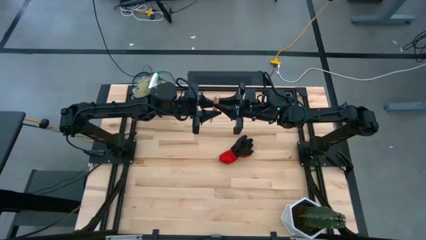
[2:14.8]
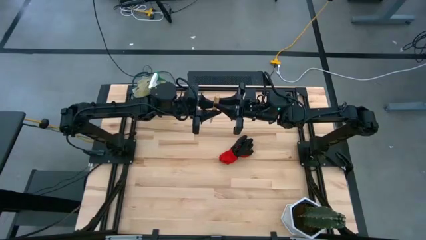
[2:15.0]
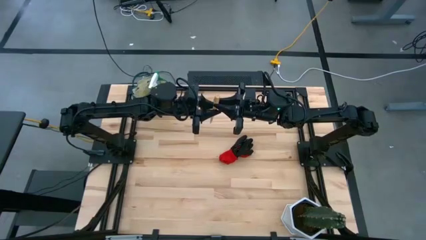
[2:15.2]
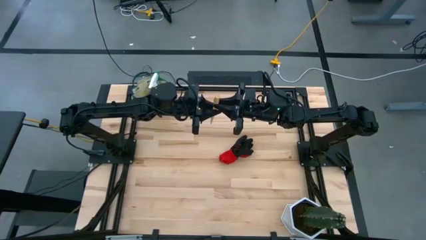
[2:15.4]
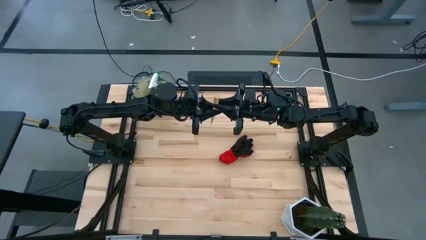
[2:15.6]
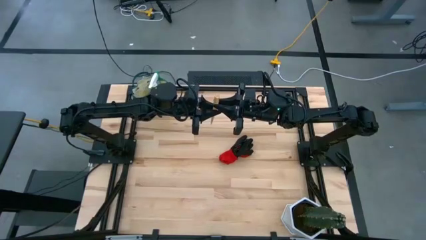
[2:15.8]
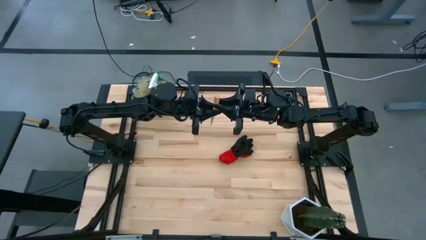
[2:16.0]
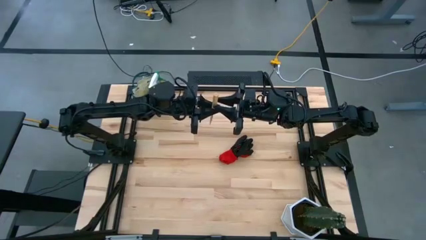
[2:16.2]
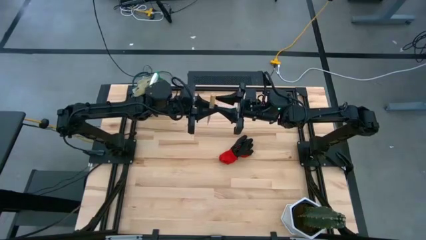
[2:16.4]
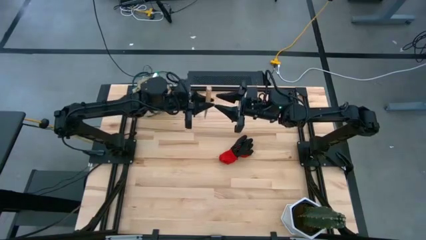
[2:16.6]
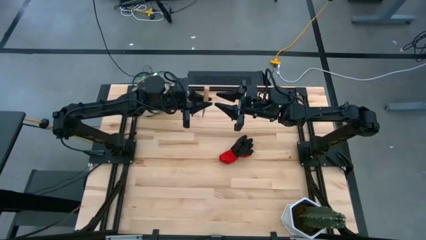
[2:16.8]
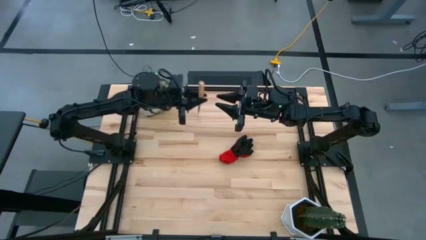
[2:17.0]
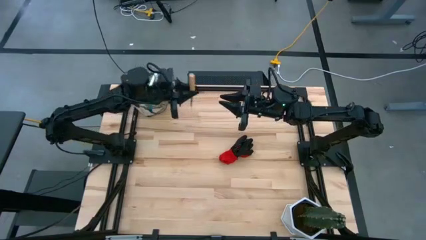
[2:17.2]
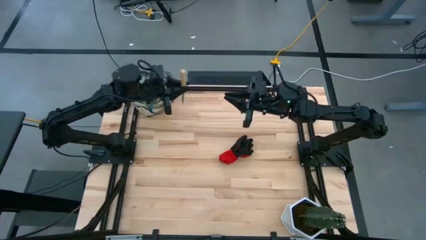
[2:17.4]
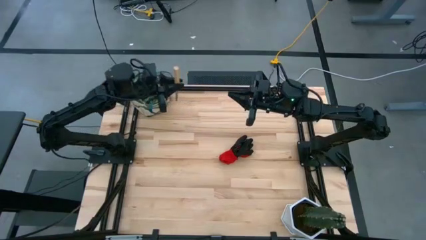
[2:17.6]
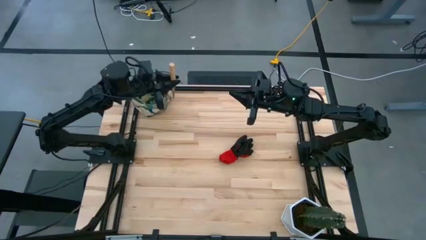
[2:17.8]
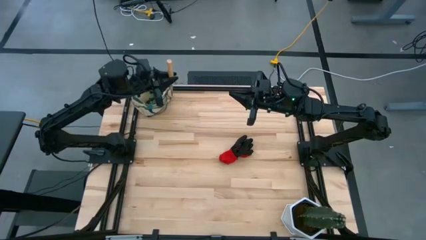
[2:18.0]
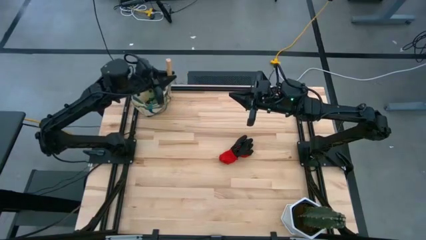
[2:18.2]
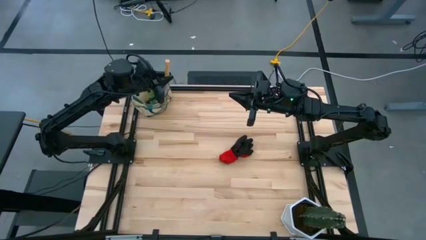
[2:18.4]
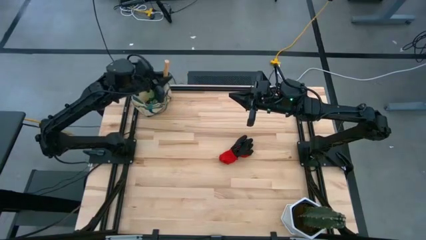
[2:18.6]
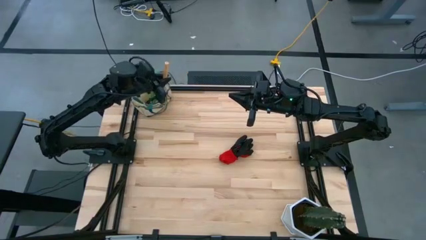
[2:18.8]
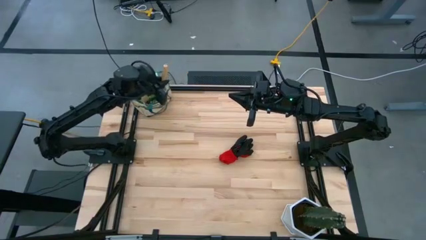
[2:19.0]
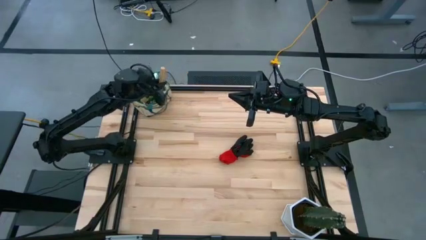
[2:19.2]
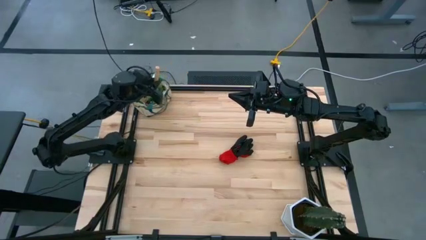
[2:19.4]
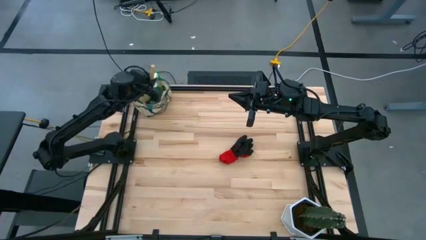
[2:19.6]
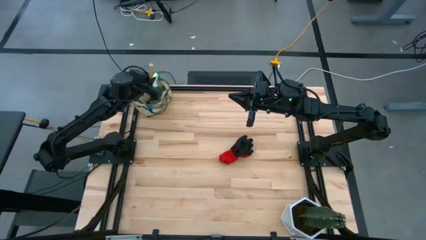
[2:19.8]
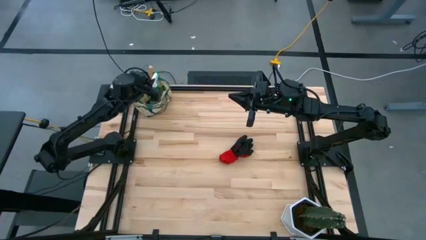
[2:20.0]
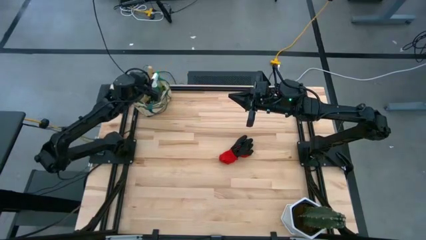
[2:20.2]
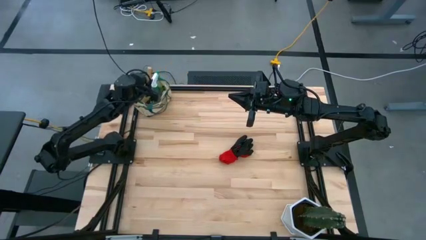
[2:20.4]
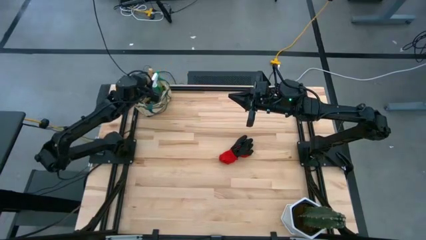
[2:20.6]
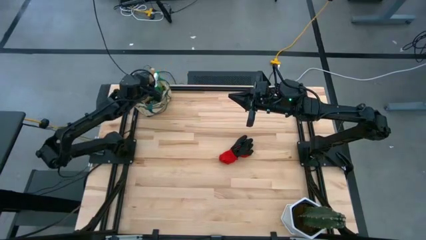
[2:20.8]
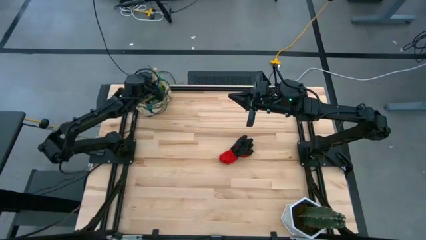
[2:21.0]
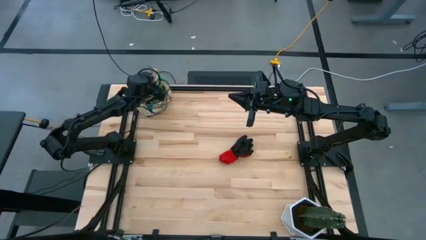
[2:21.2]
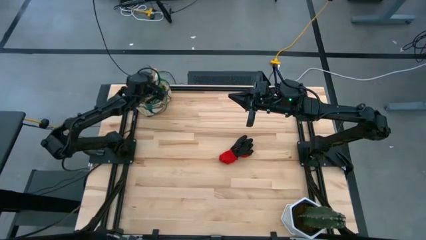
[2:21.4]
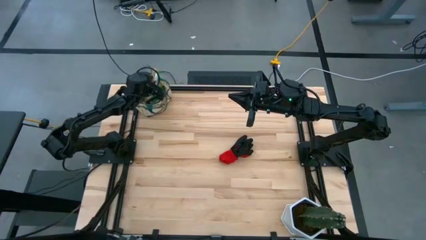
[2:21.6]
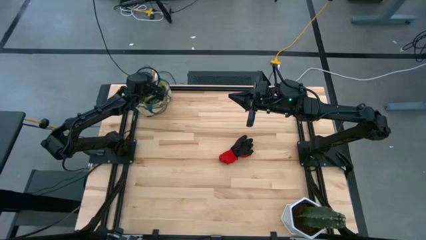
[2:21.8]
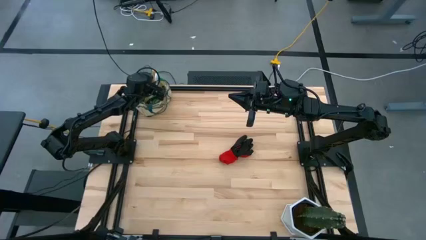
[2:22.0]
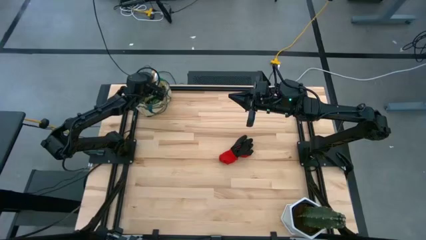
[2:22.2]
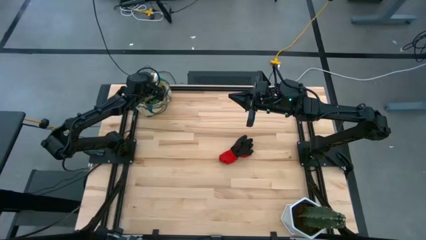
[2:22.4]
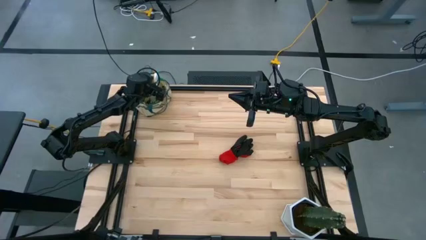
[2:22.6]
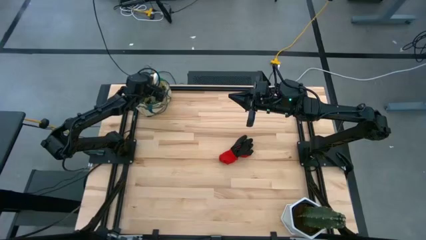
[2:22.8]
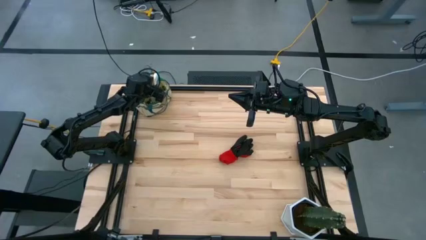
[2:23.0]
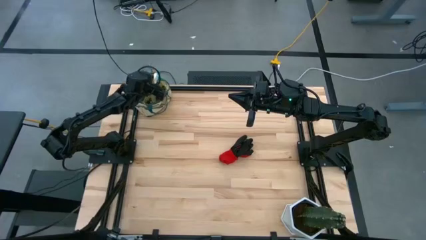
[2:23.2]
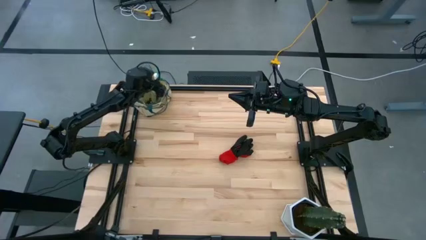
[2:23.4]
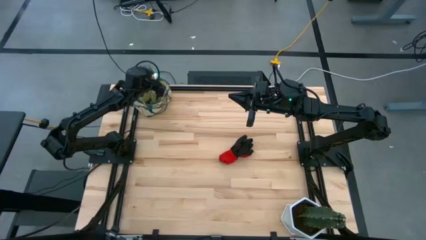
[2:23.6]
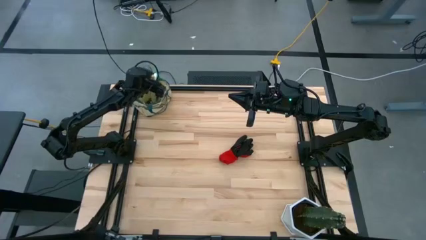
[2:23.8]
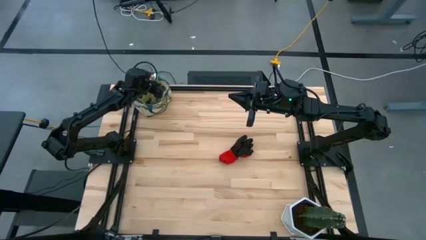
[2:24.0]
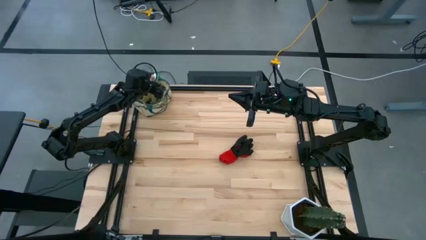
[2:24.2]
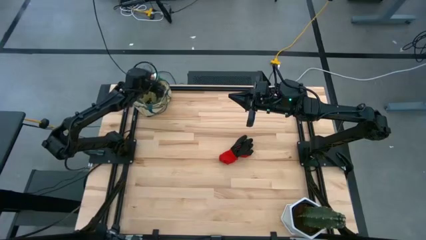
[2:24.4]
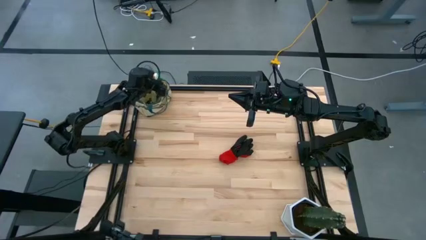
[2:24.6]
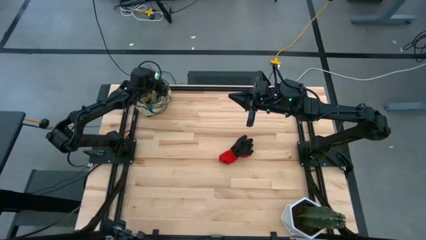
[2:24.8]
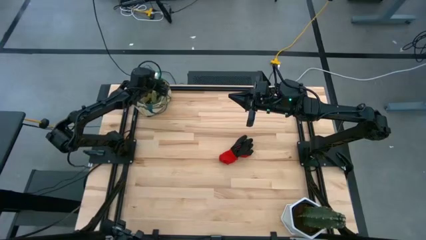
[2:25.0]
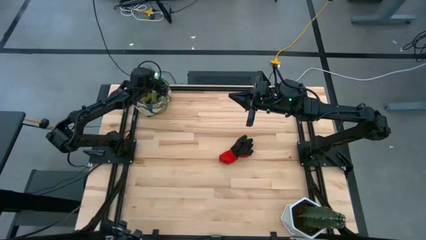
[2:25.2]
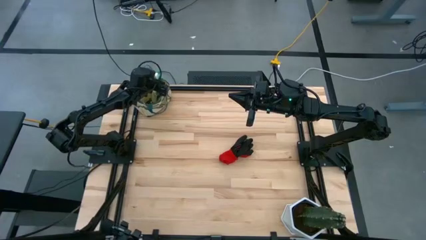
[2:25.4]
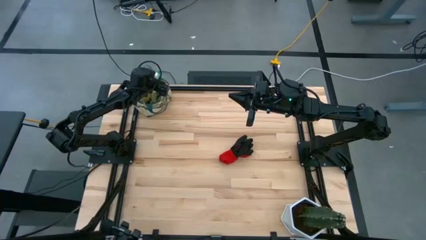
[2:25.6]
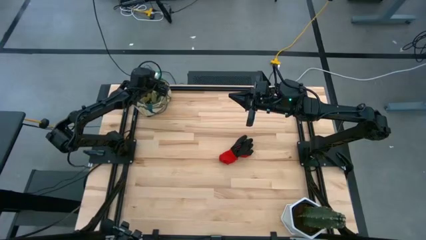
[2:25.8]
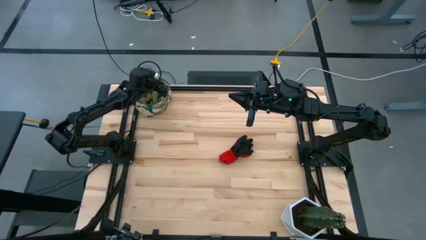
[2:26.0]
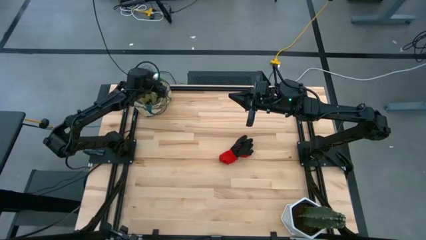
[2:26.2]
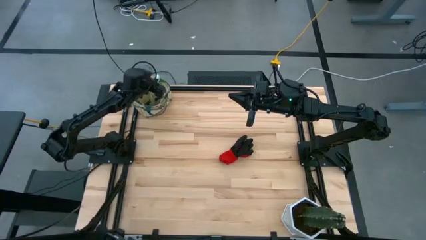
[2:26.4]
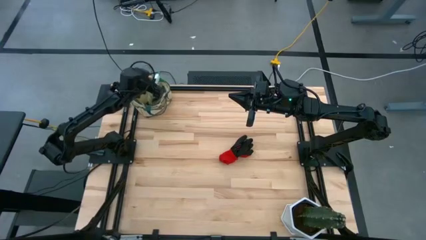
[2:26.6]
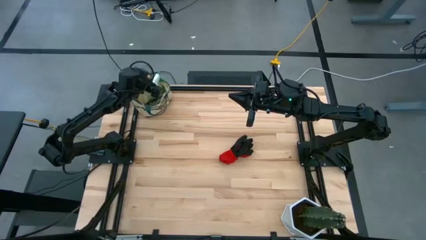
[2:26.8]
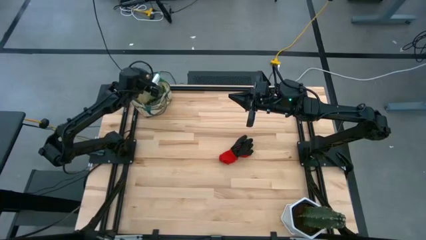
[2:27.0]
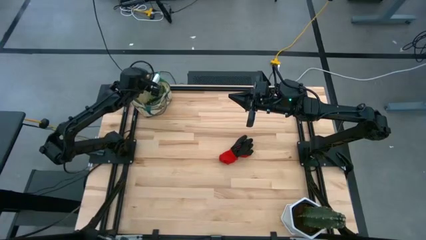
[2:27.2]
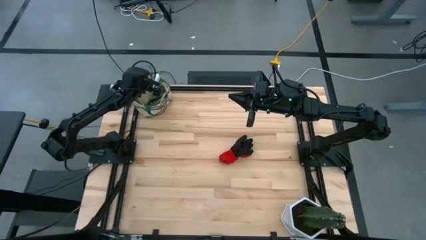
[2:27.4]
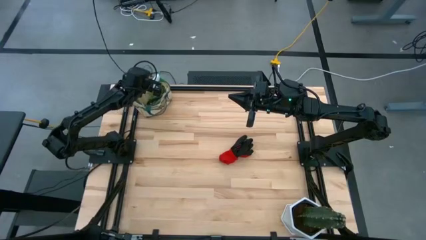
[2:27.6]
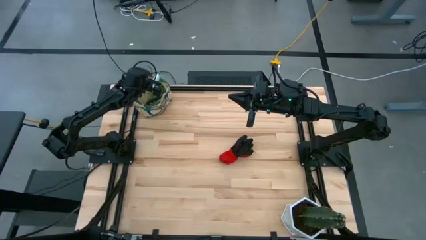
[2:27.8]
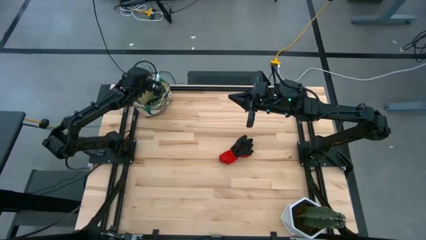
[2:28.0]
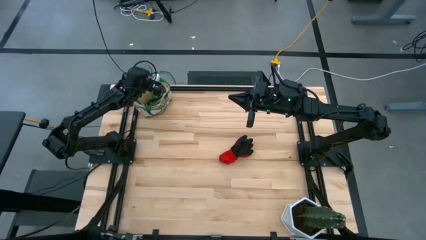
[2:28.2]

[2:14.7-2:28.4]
Task: Pick & Place Garden tools in Gardening bag
Put the trowel into the gardening bag

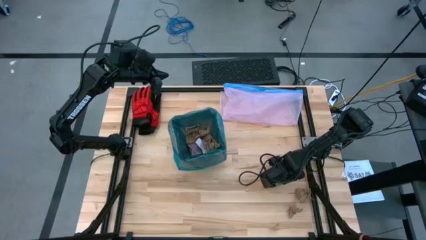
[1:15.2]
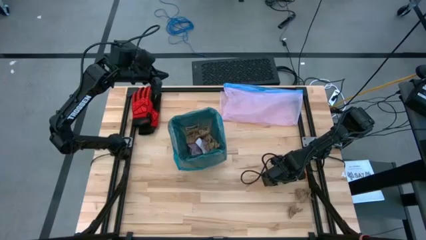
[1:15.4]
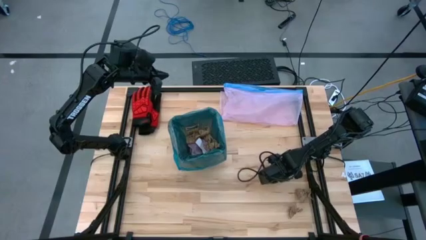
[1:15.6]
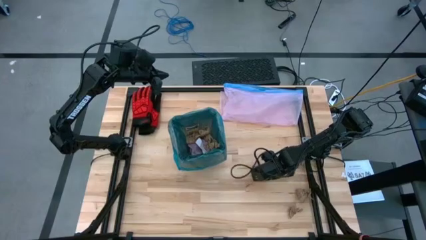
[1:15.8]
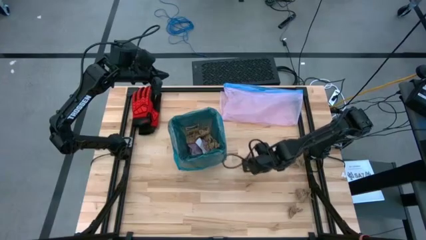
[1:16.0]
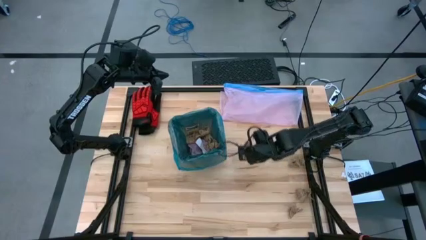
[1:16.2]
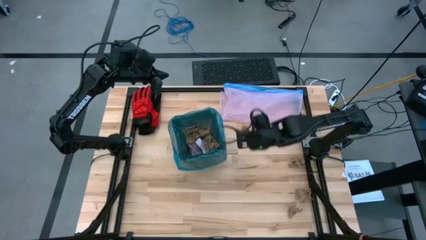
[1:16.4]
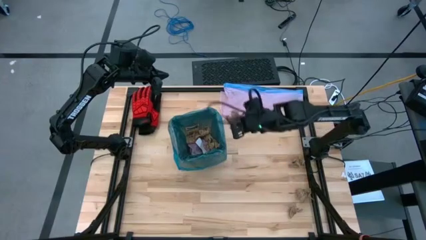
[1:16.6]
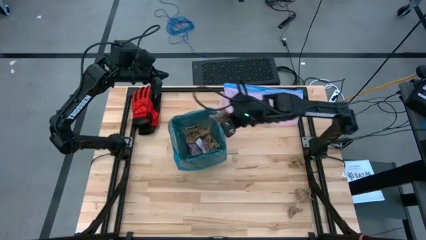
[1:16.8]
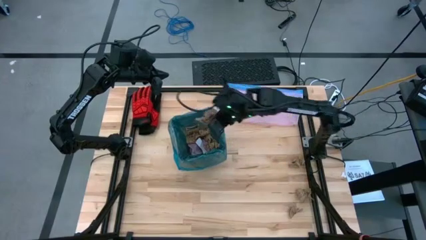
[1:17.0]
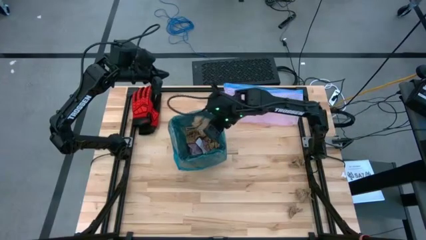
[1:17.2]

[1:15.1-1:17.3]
Task: place trash/remove bag and relplace
Put the brown napkin into the black trash bin
